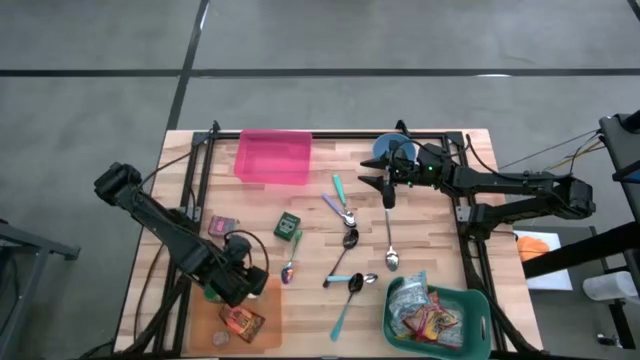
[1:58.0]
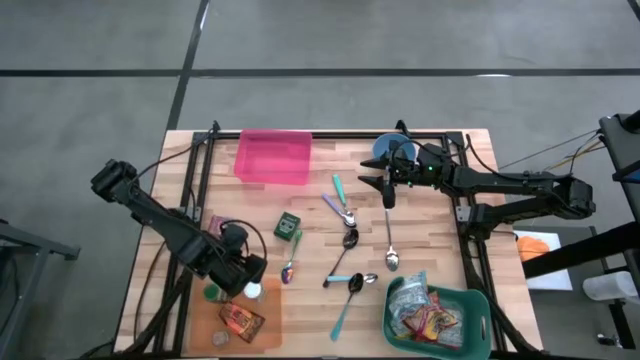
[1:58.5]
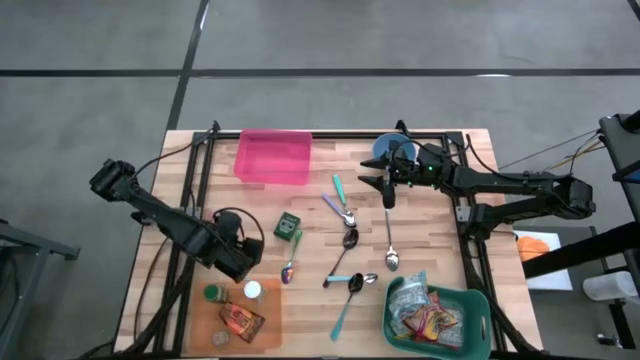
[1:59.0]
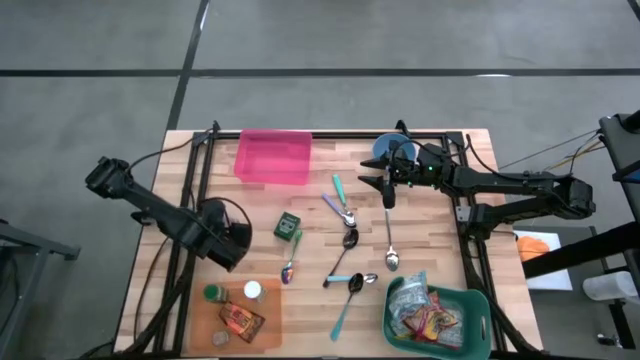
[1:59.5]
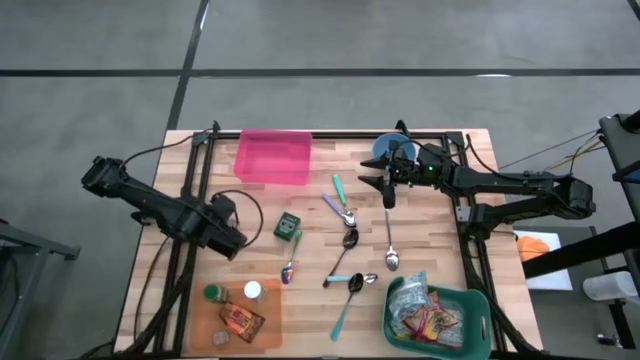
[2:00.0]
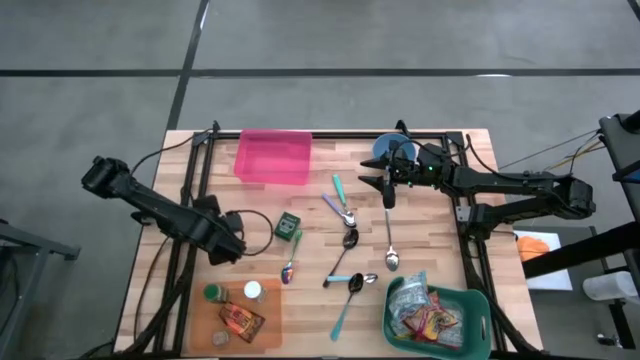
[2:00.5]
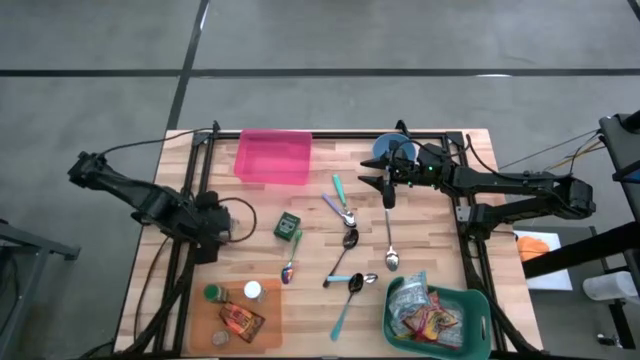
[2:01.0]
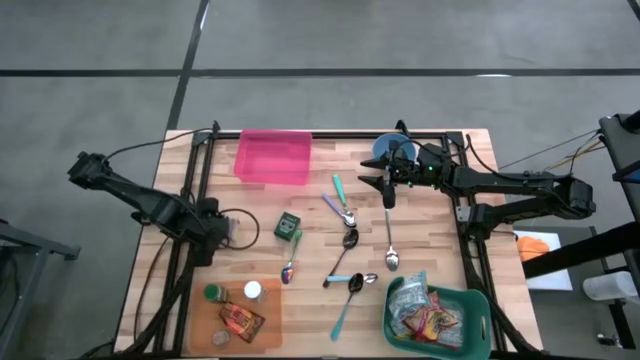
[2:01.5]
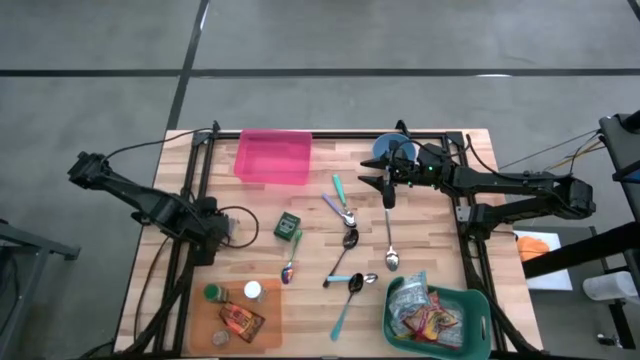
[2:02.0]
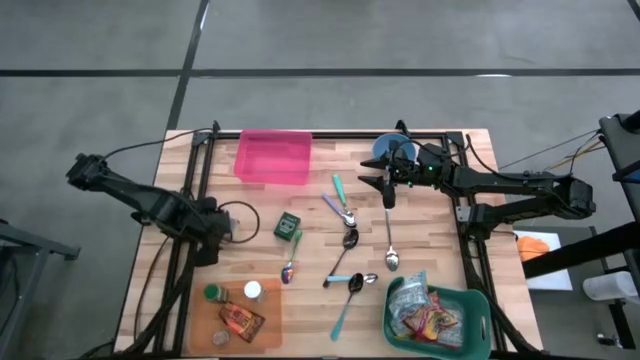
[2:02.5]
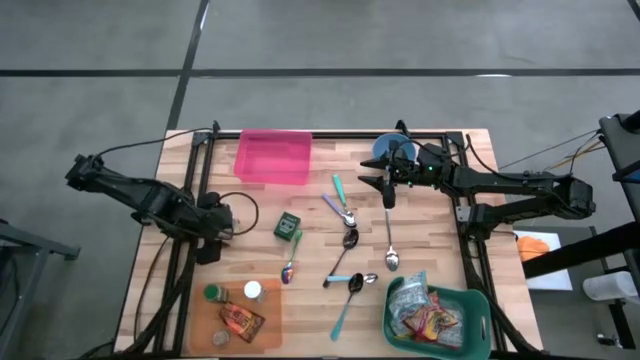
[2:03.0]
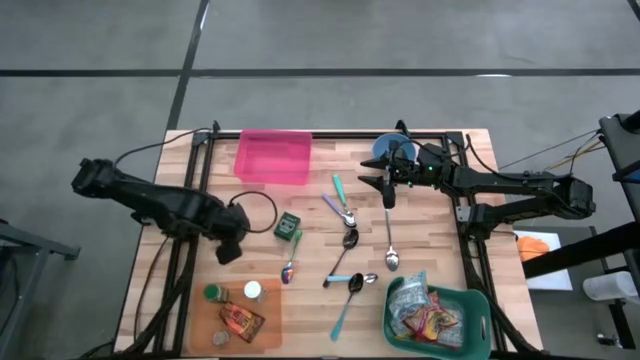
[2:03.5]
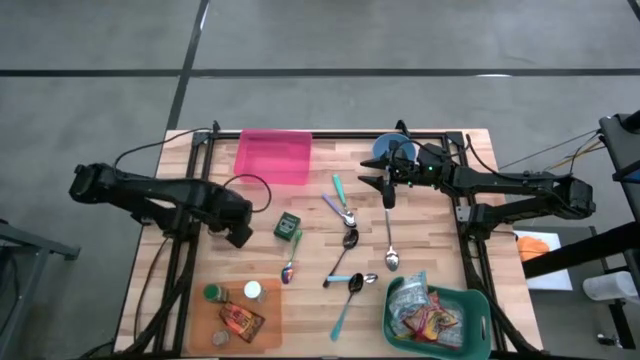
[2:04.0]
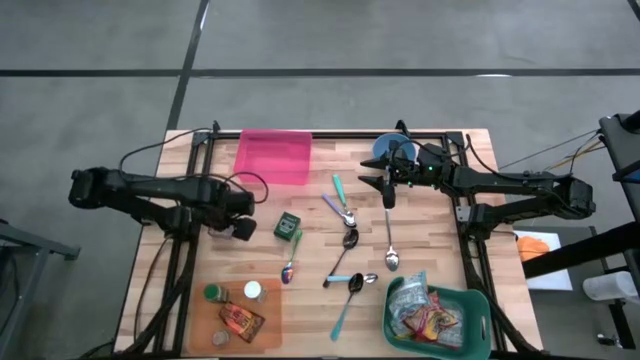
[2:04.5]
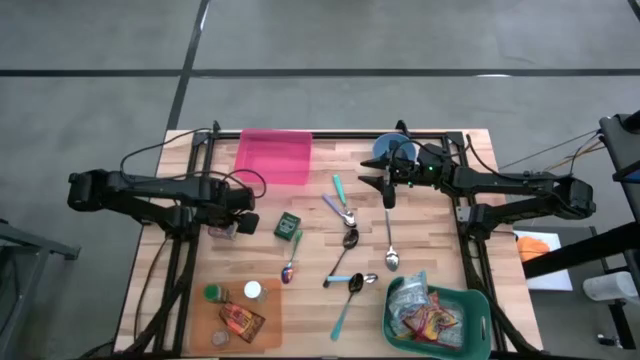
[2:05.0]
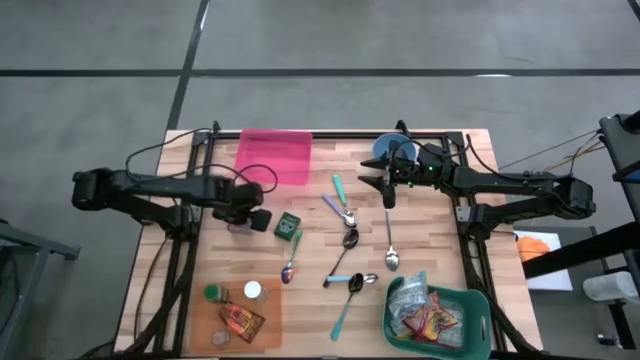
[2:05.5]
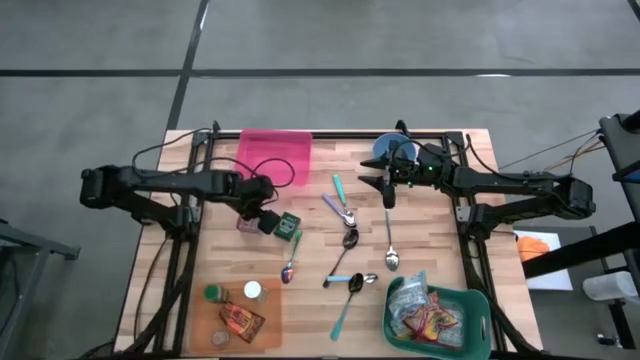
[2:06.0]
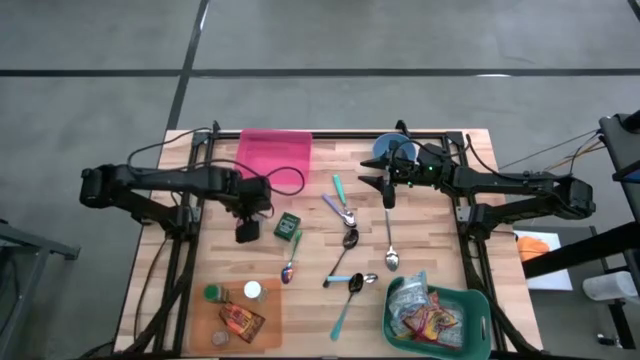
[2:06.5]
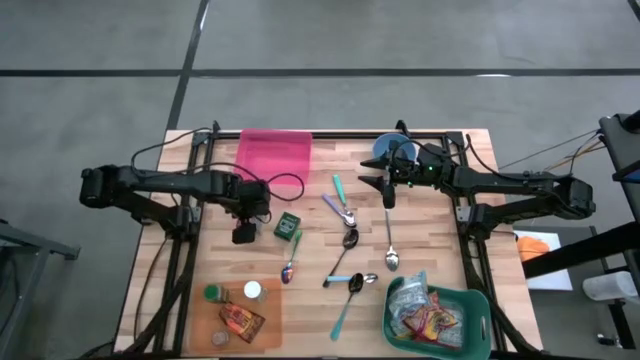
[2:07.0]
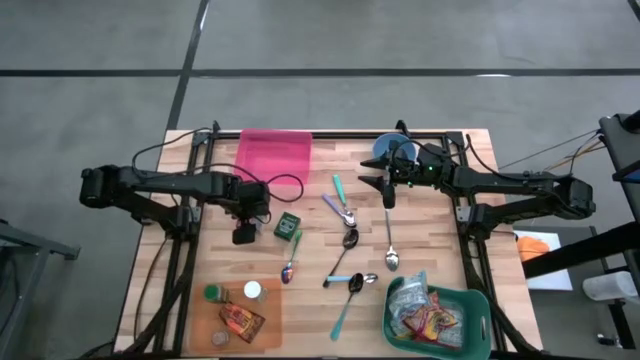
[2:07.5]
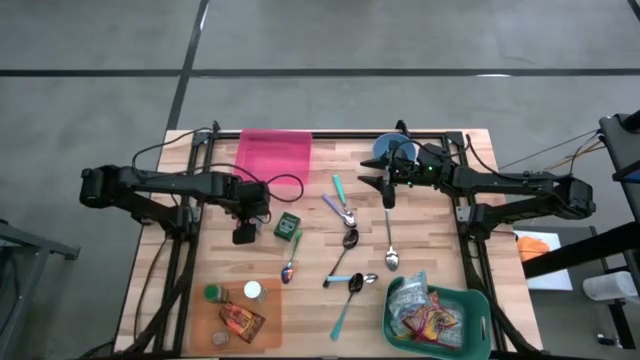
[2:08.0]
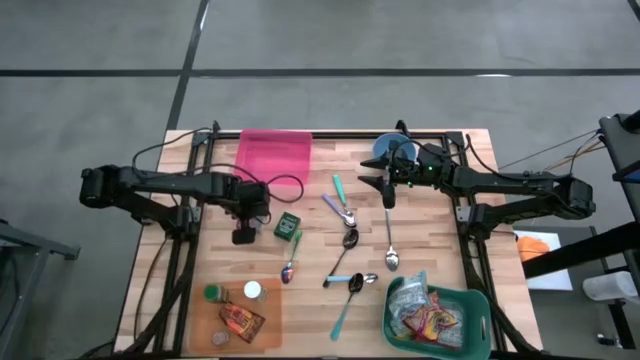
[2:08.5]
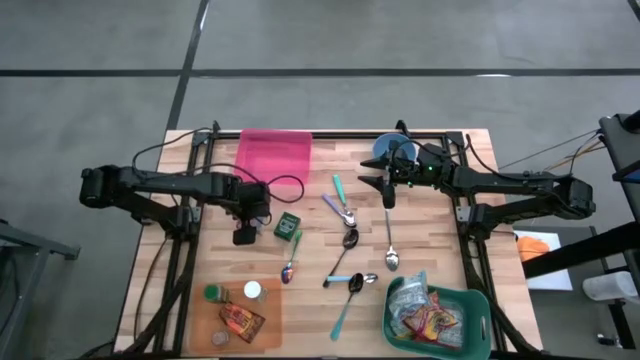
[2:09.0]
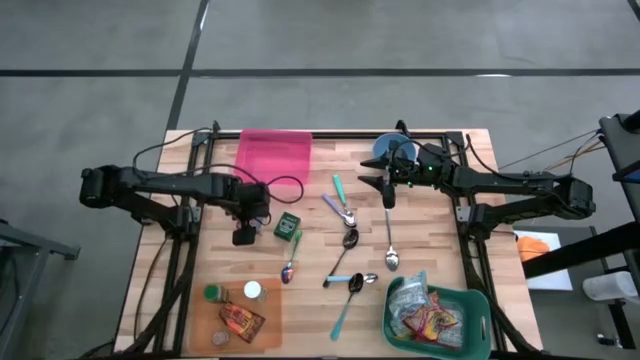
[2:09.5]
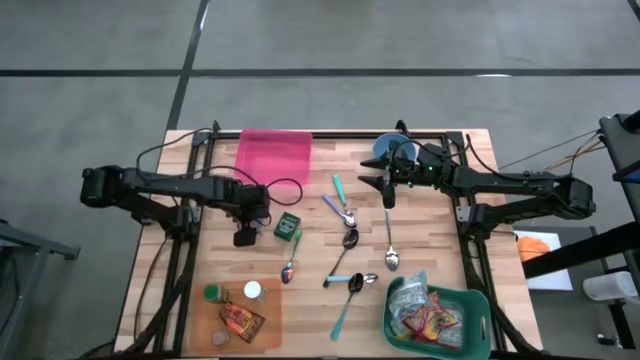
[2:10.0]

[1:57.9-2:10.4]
Put the red seasoning can into the orange bin

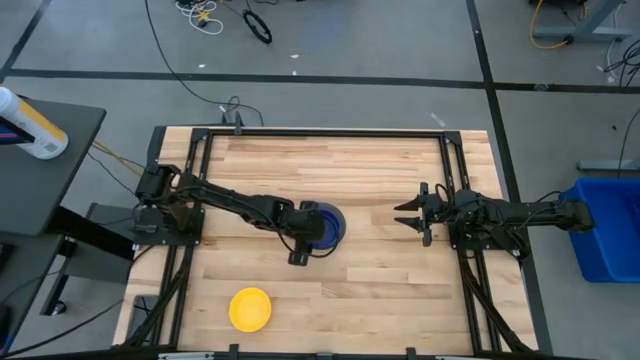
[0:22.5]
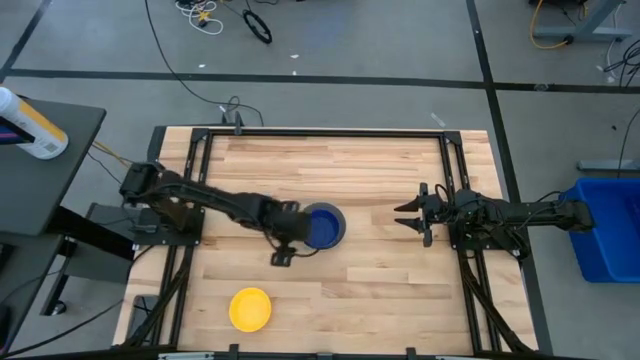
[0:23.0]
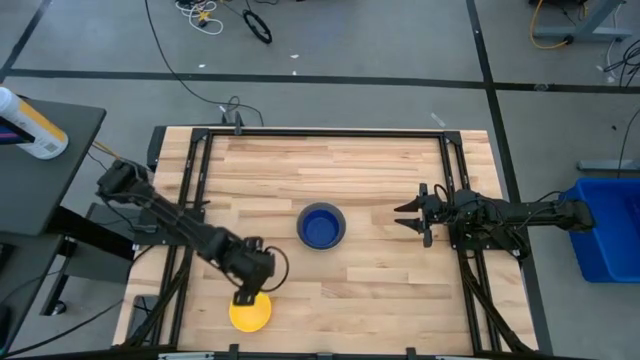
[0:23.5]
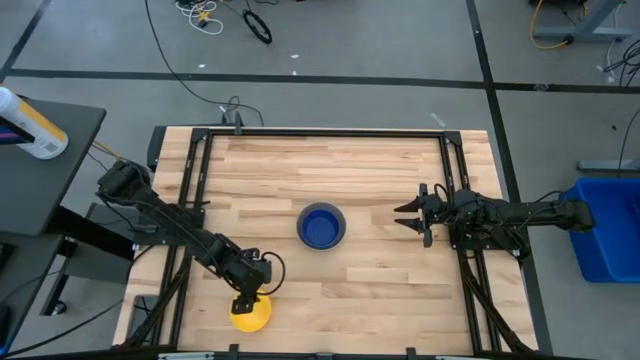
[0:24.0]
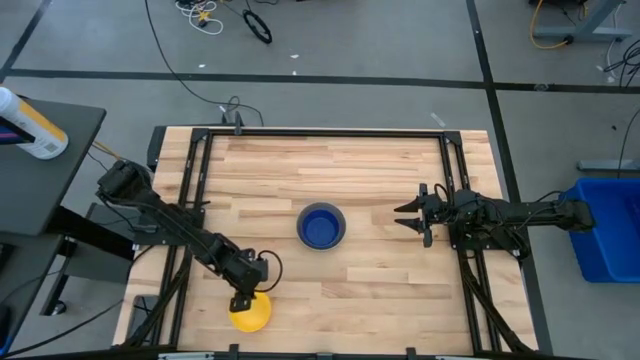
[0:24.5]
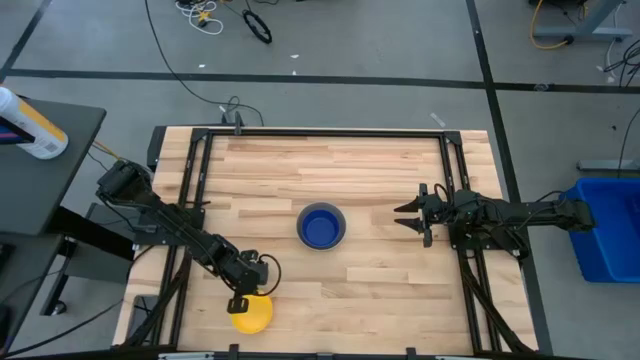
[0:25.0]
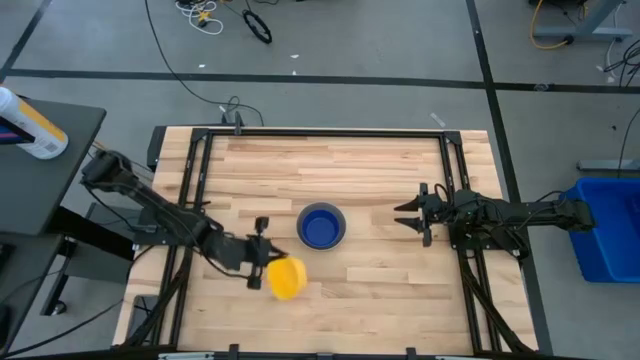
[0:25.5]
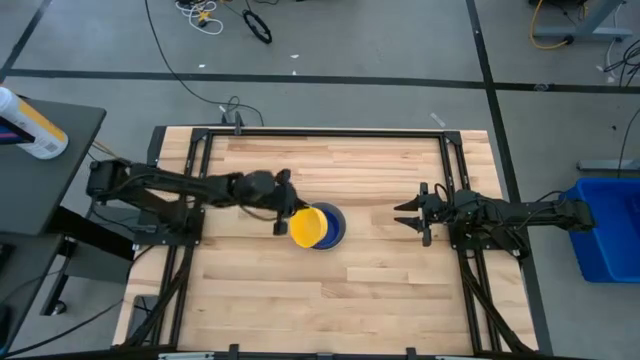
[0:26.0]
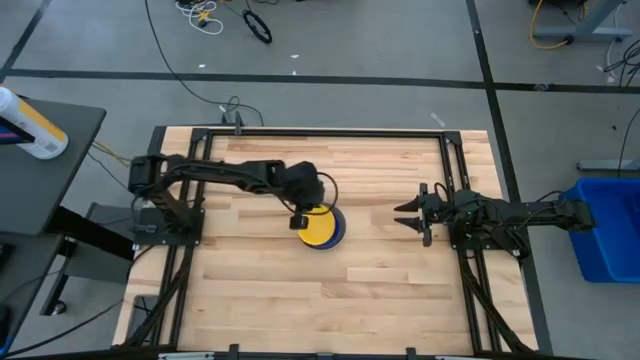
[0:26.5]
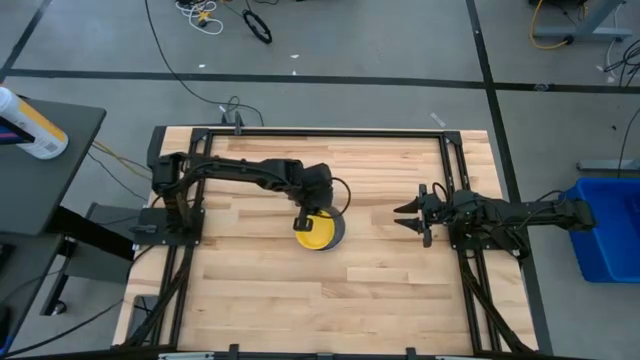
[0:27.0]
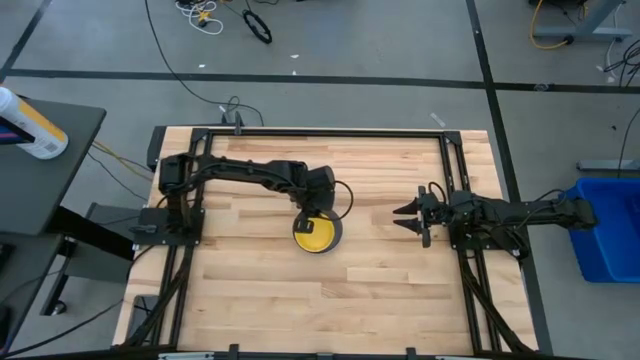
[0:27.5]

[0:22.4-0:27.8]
Stack the yellow bowl on the dark blue bowl

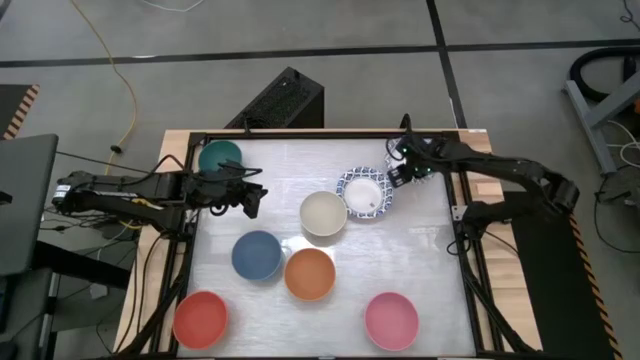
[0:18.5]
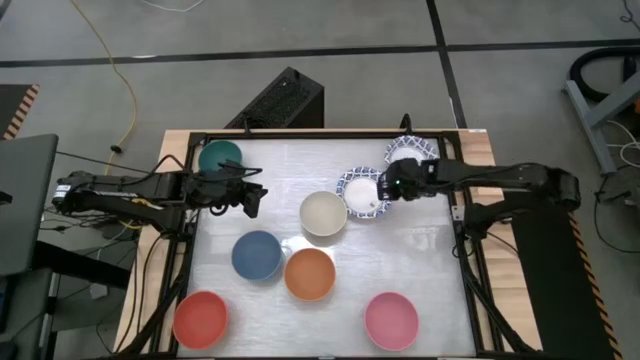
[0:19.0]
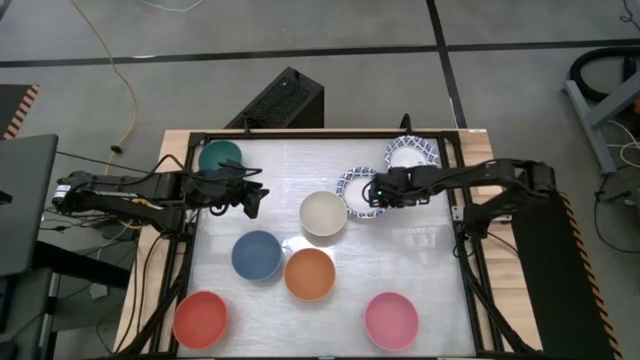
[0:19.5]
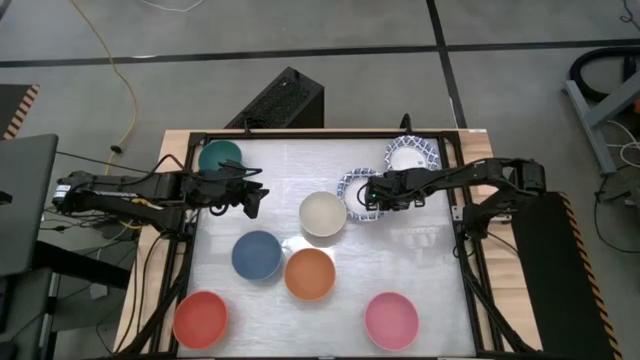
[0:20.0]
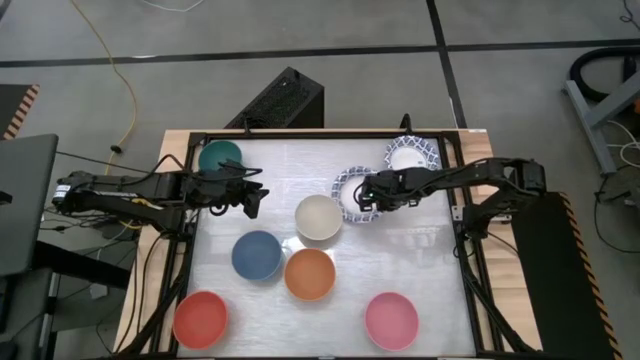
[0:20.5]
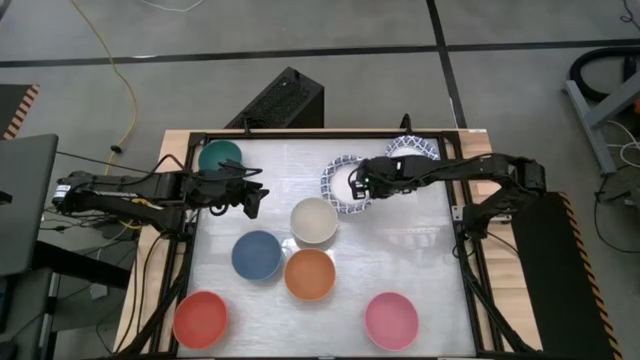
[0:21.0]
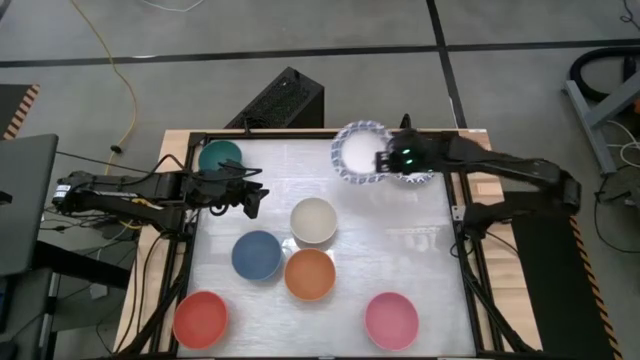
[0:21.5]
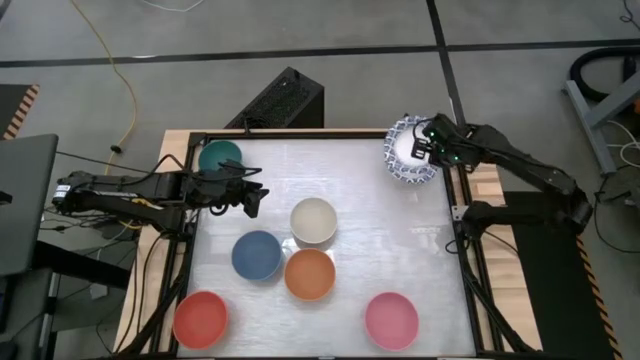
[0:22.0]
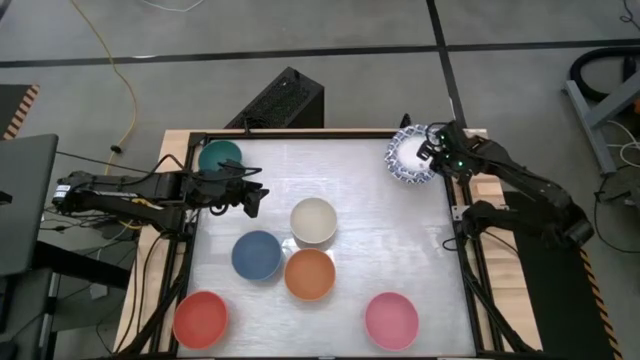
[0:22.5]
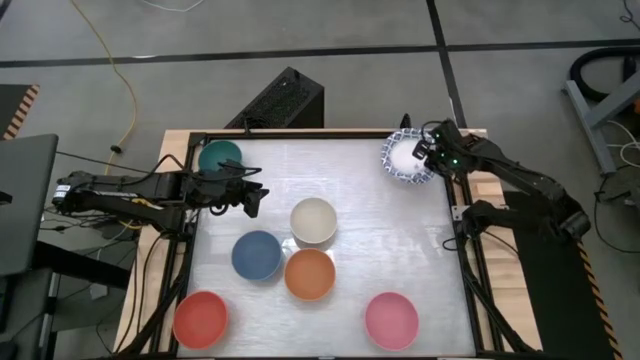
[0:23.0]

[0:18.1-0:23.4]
Stack the blue patterned bowl into the blue patterned bowl
